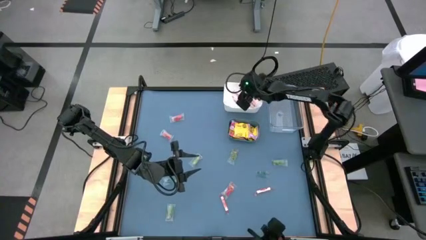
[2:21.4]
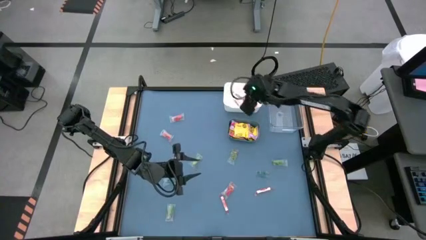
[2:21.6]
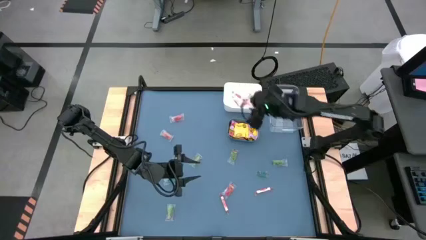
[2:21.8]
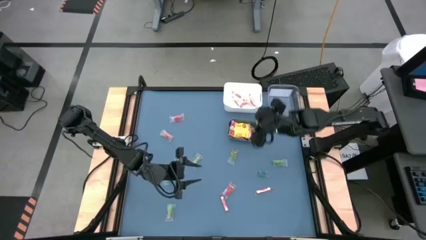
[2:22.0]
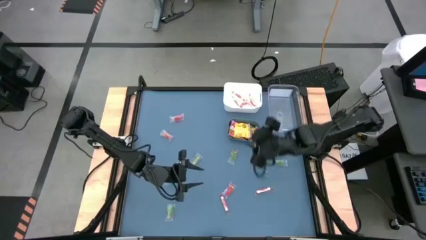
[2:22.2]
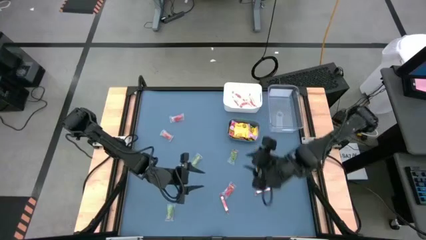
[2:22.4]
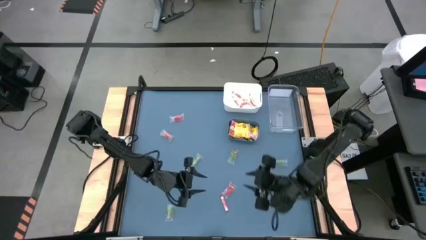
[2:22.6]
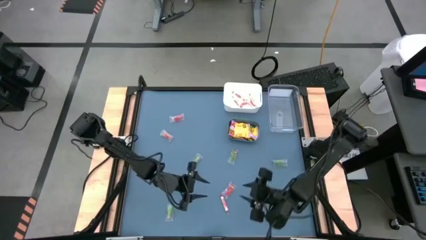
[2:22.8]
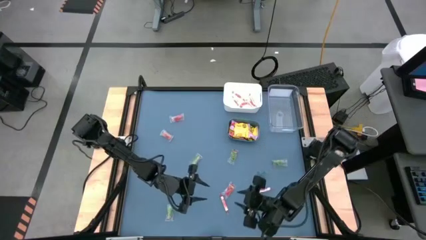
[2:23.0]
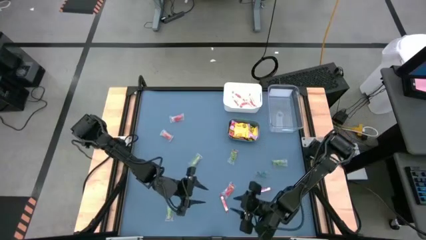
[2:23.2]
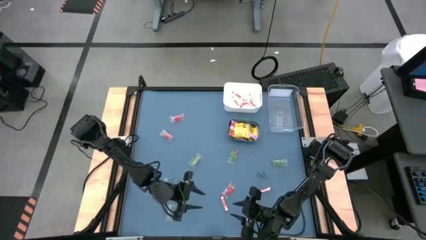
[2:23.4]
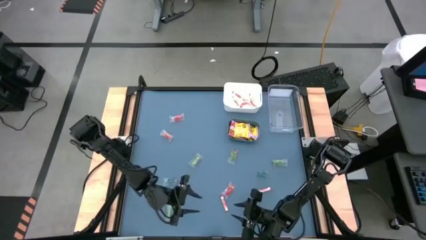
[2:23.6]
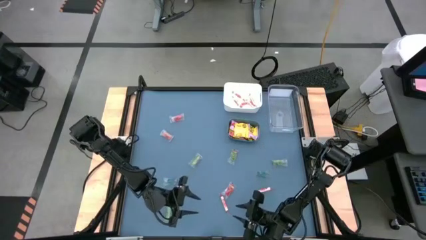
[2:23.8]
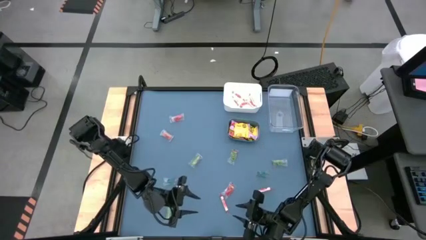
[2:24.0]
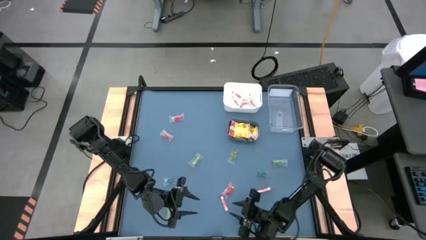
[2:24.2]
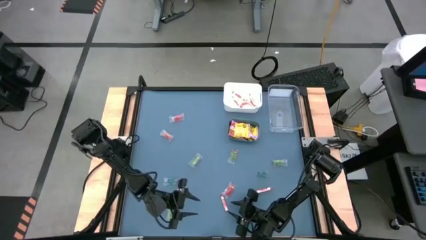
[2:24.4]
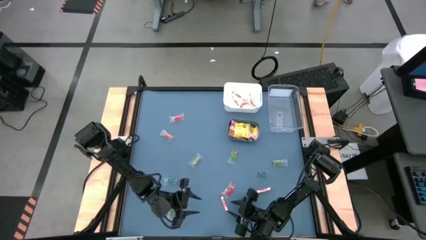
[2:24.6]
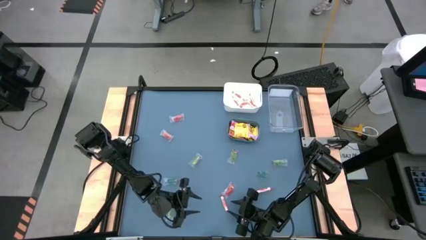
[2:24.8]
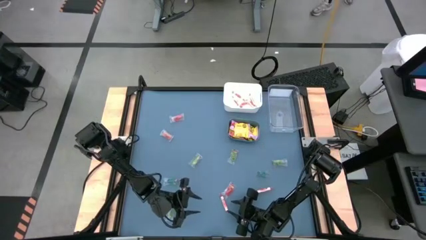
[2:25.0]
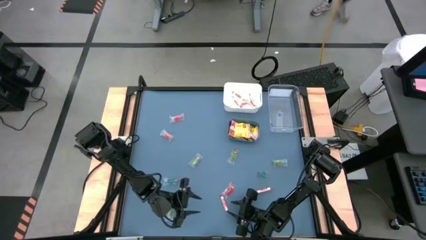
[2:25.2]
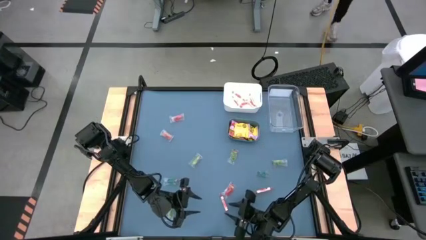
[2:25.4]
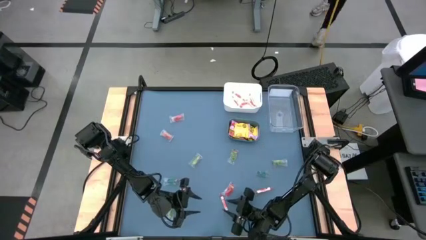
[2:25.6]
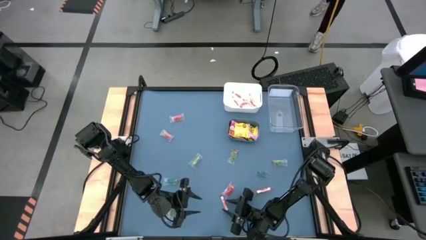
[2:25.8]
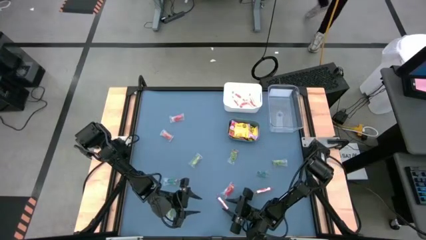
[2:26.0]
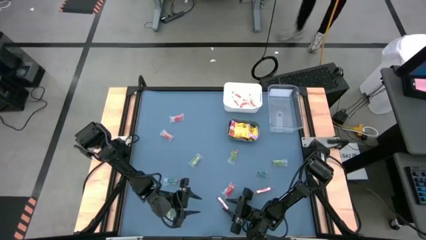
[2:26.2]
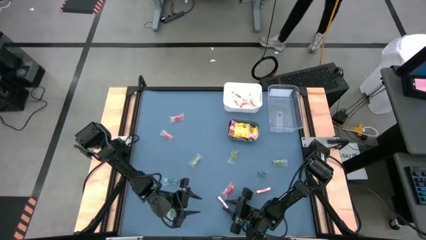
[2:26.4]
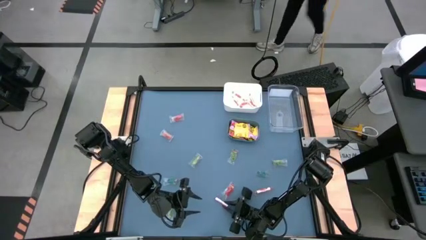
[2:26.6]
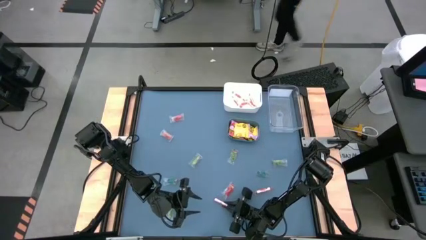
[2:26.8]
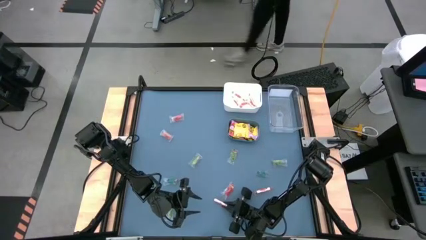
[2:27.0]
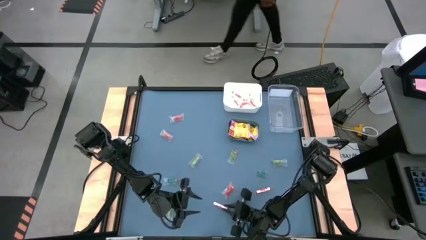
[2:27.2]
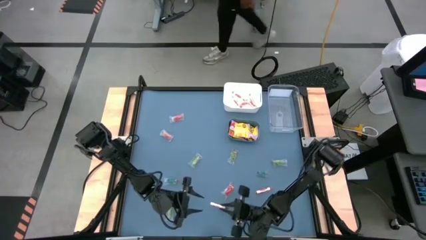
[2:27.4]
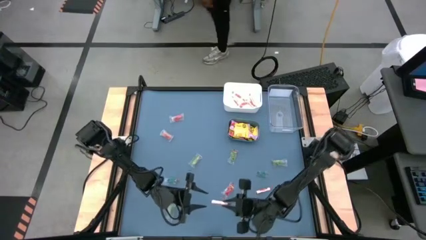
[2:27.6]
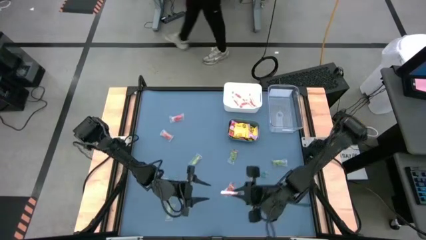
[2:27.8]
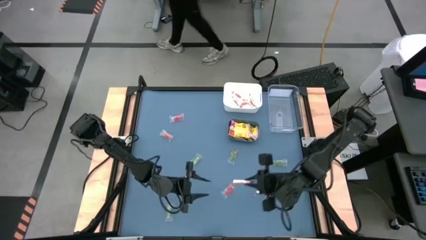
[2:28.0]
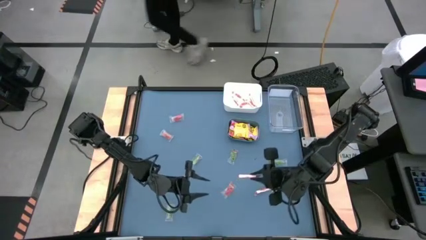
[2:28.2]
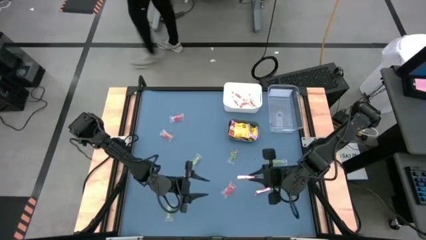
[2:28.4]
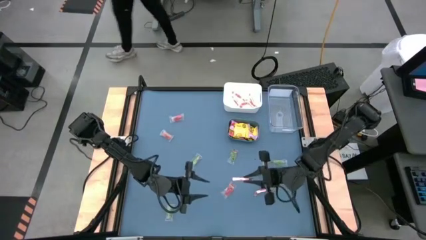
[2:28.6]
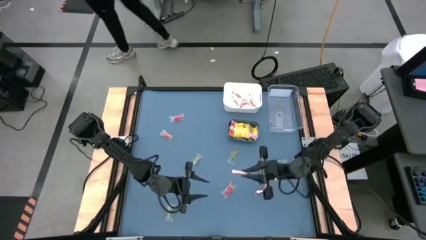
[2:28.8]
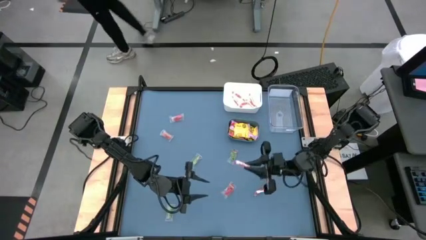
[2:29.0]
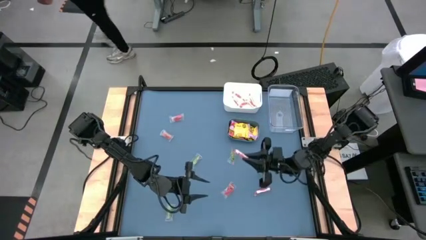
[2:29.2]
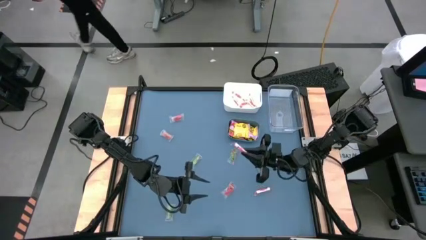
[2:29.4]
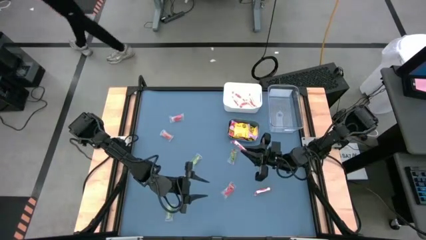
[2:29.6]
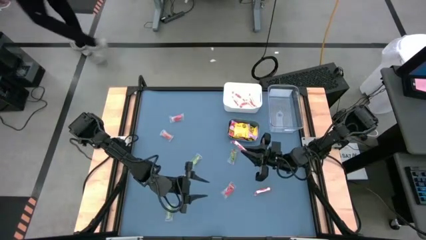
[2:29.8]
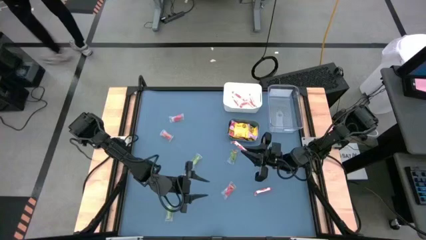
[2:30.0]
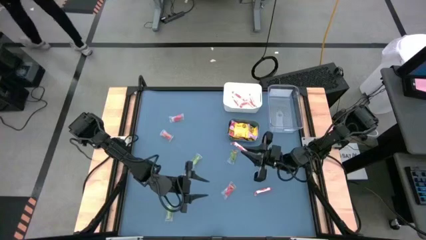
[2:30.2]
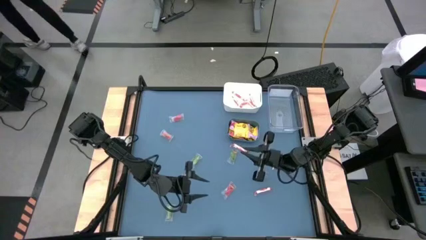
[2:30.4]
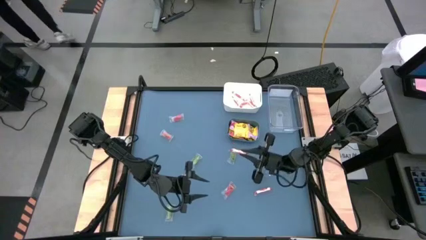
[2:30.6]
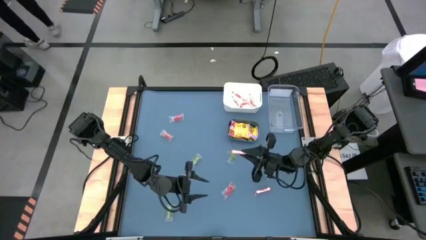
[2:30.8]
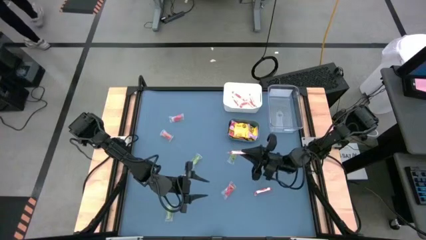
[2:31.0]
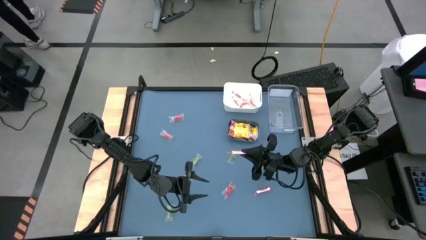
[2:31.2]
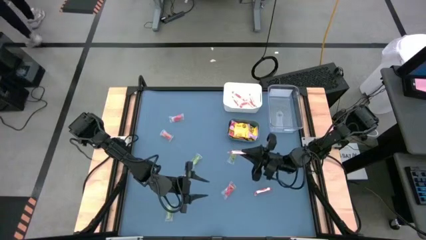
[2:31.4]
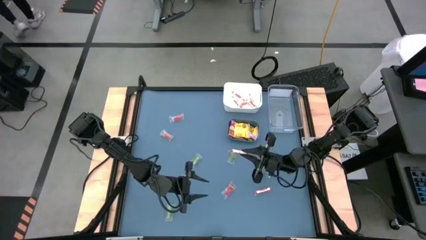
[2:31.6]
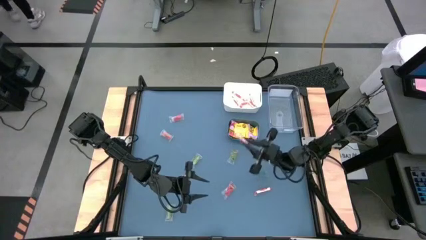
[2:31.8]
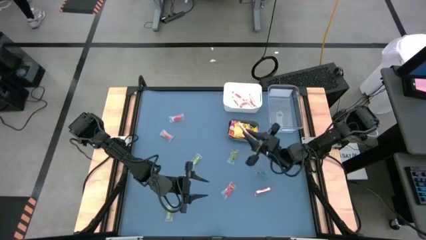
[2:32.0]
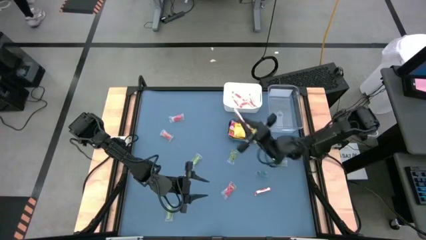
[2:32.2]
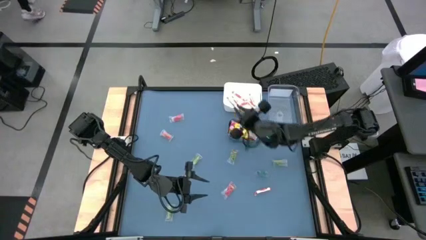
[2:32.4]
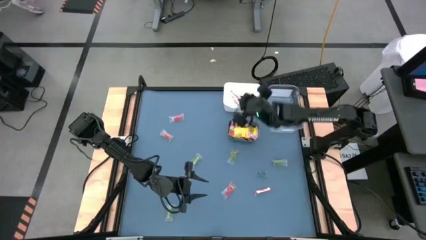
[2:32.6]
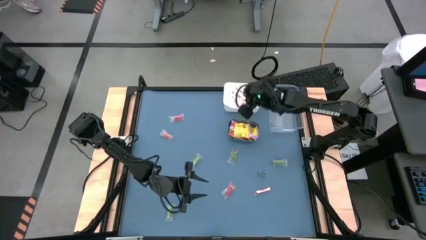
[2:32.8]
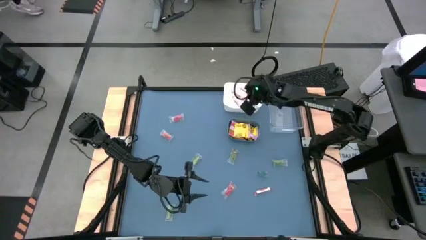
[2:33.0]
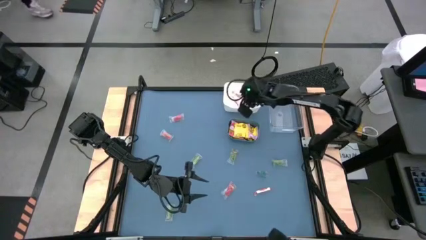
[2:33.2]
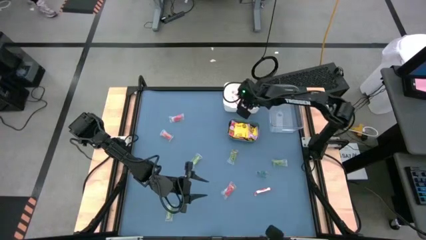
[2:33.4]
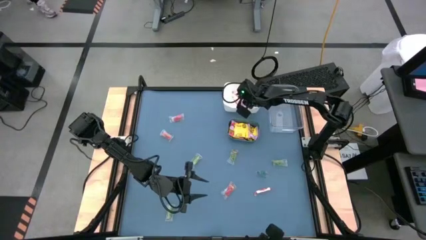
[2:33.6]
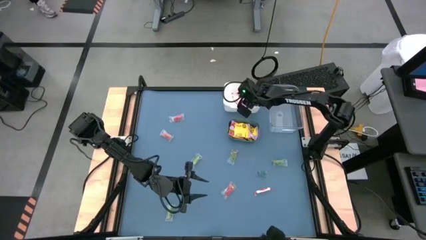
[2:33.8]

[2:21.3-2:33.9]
Task: Sort candy
Put the left white candy into the white bin

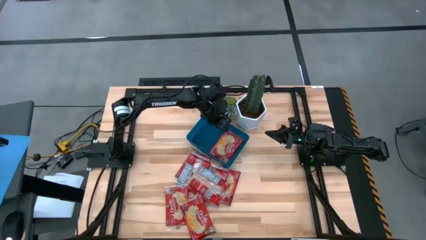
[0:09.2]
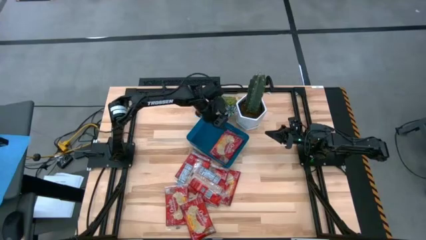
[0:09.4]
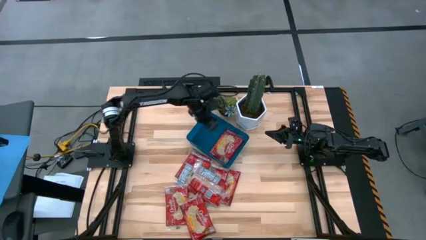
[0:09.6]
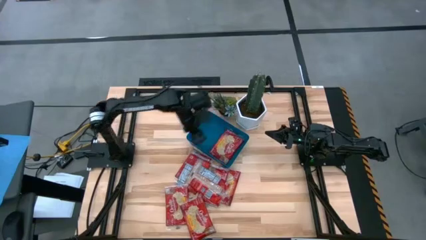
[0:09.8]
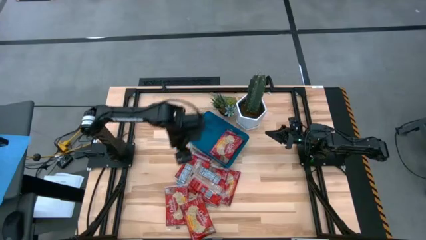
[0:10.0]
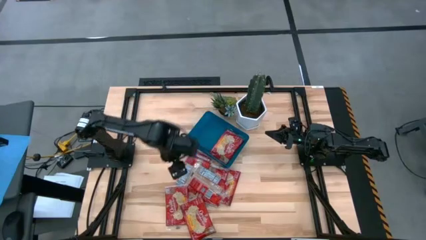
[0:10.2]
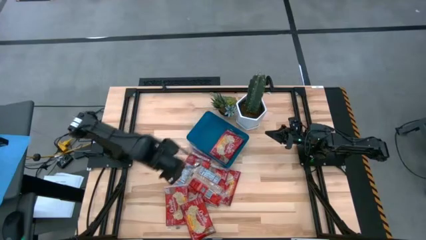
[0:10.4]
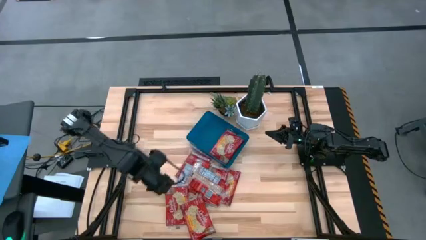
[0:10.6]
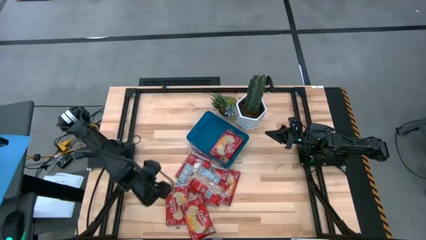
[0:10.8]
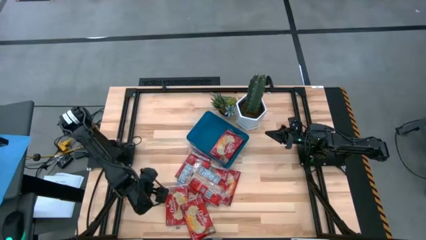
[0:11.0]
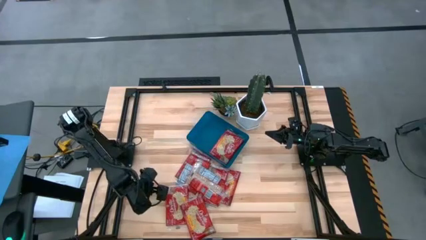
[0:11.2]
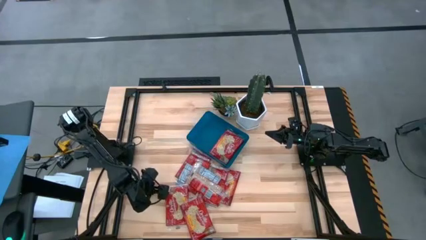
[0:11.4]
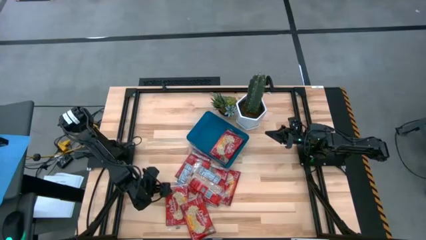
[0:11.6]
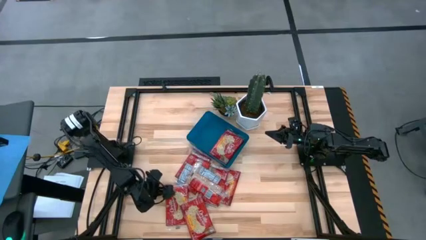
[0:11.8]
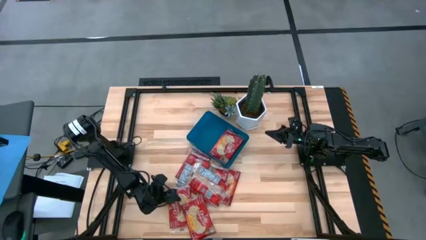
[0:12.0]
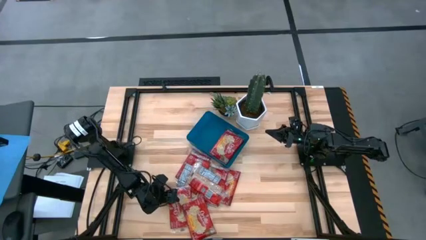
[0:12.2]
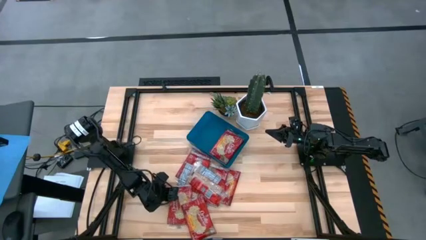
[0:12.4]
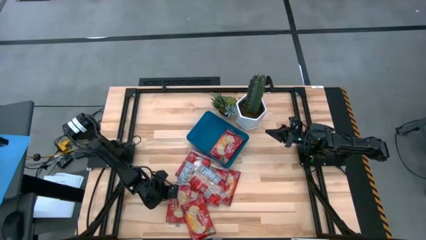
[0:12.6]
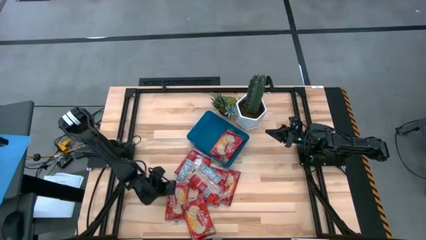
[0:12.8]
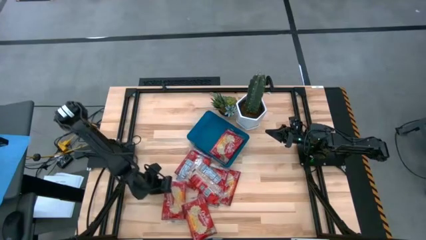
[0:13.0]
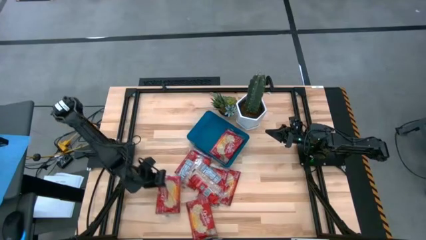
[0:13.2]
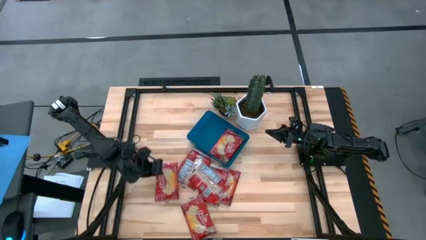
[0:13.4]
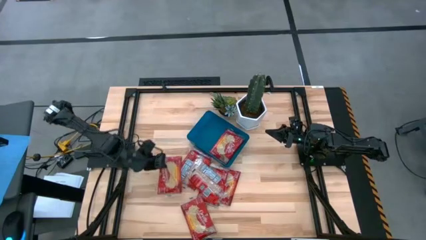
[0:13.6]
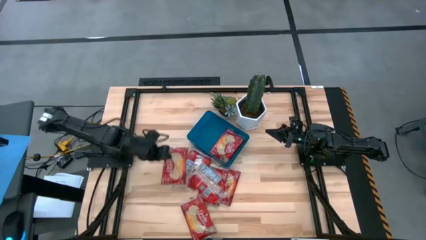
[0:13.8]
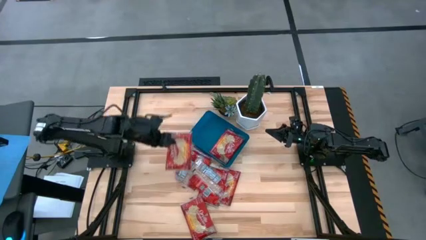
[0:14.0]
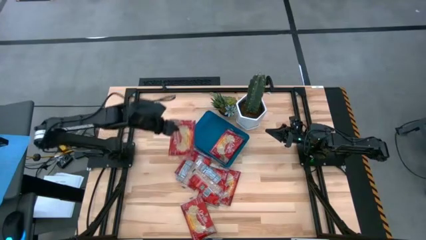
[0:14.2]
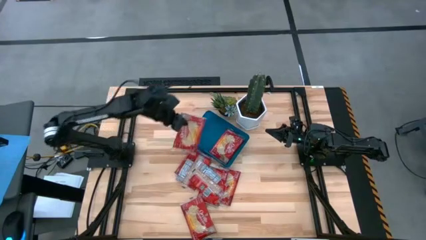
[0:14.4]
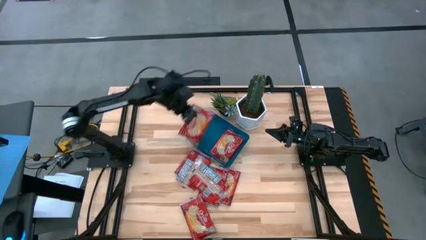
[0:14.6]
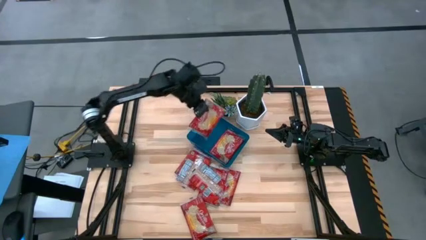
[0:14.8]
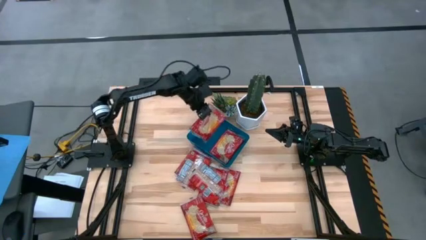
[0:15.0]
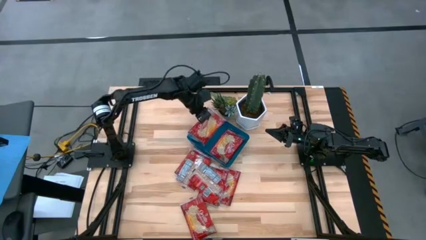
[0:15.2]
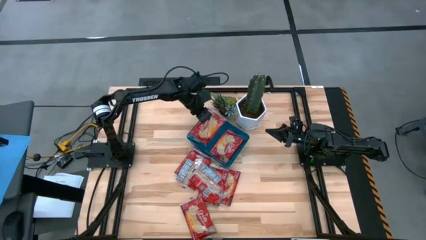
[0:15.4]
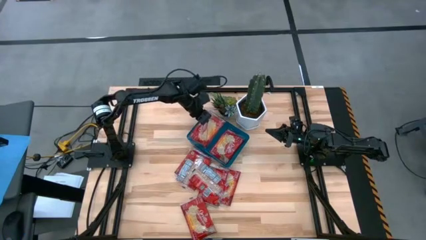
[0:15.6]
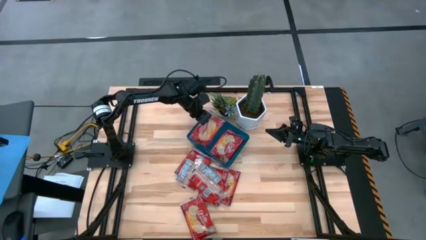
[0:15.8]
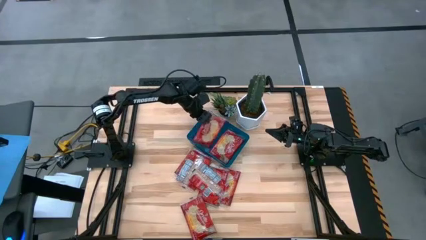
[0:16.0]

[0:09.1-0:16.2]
Task: Sort popcorn bags into baskets
Put the popcorn bag into the blue bin
